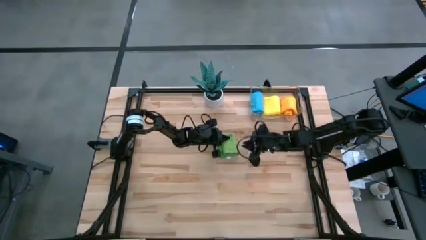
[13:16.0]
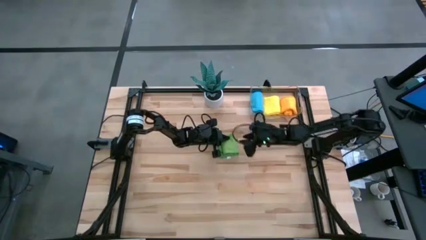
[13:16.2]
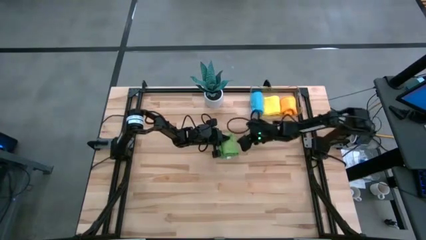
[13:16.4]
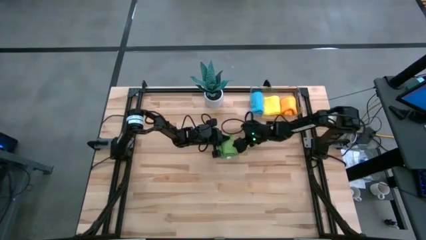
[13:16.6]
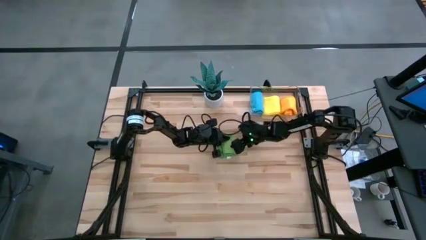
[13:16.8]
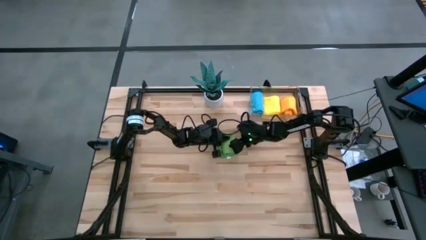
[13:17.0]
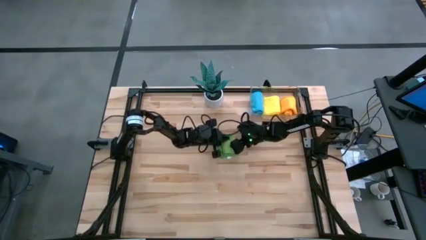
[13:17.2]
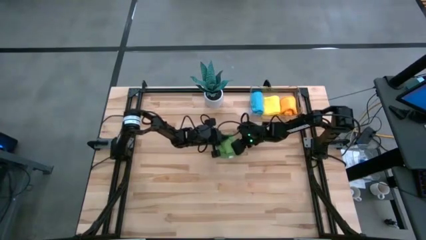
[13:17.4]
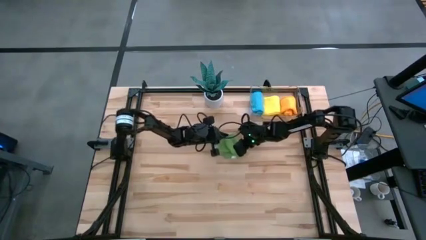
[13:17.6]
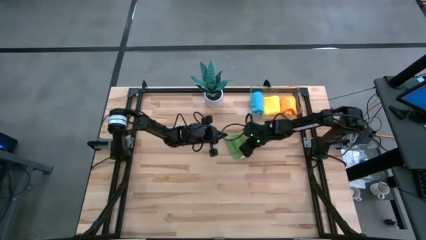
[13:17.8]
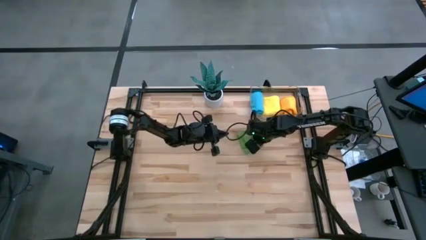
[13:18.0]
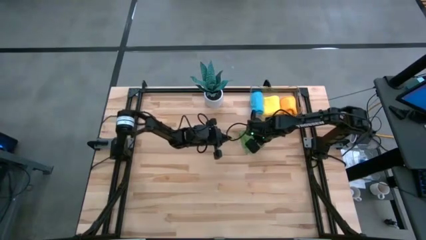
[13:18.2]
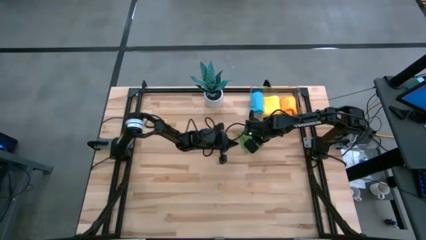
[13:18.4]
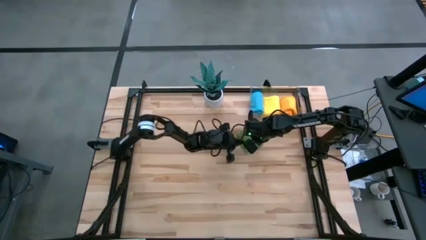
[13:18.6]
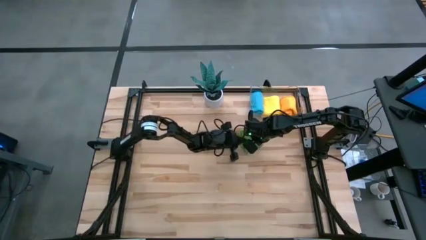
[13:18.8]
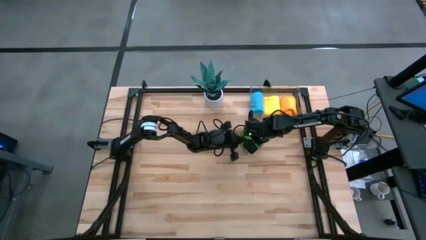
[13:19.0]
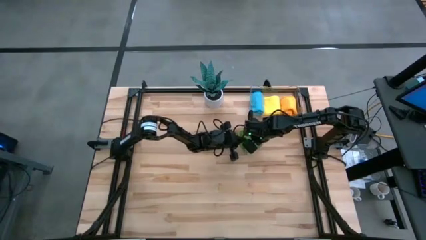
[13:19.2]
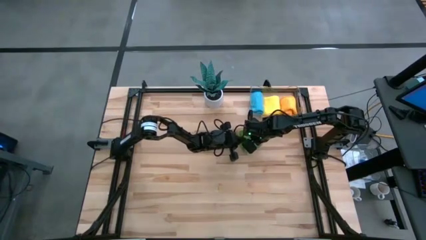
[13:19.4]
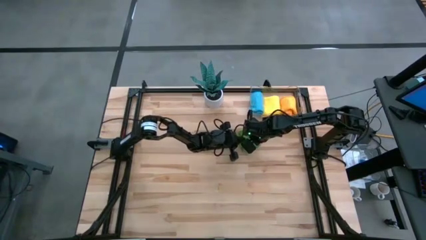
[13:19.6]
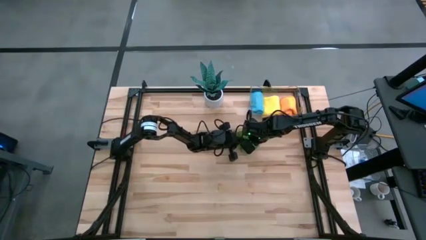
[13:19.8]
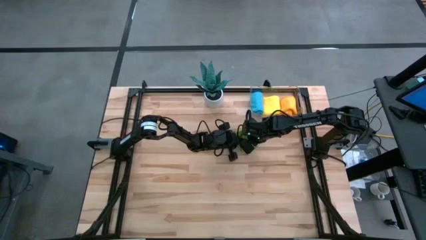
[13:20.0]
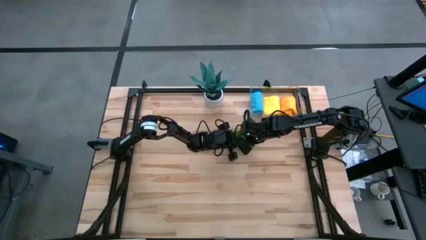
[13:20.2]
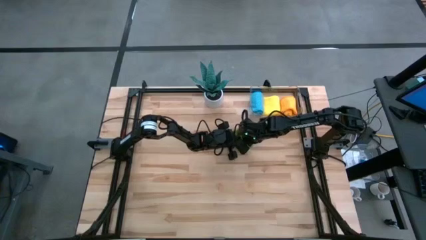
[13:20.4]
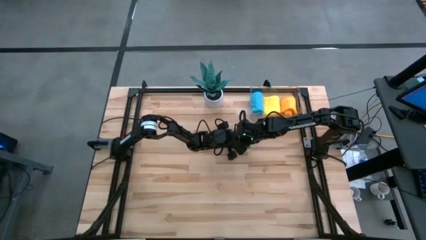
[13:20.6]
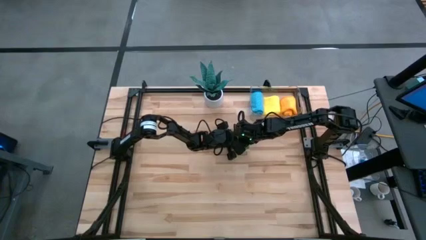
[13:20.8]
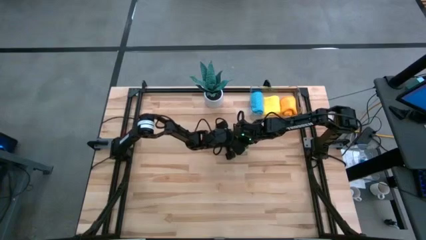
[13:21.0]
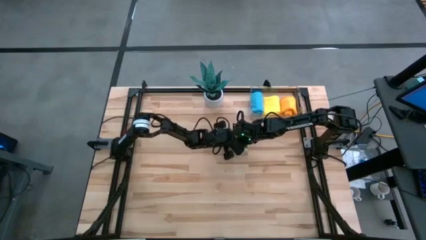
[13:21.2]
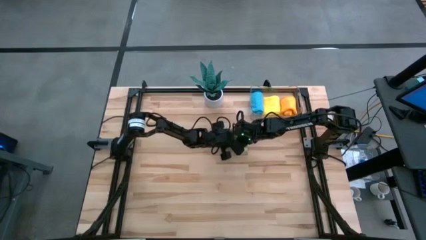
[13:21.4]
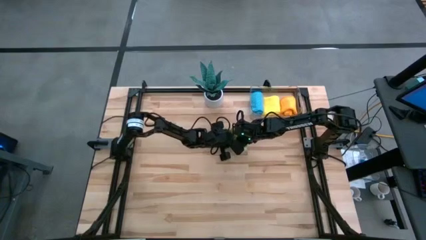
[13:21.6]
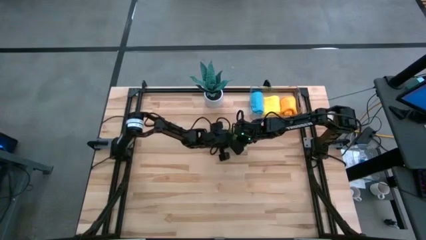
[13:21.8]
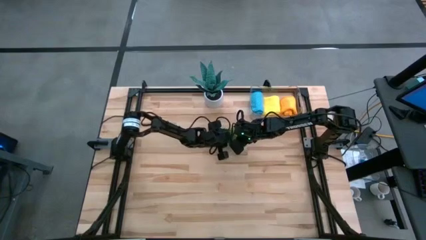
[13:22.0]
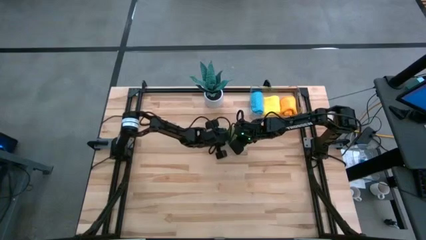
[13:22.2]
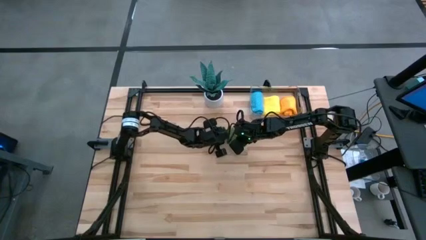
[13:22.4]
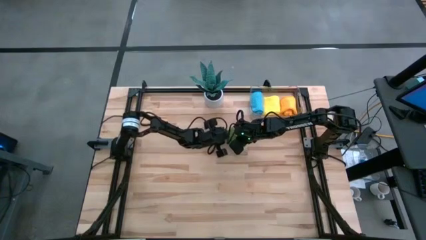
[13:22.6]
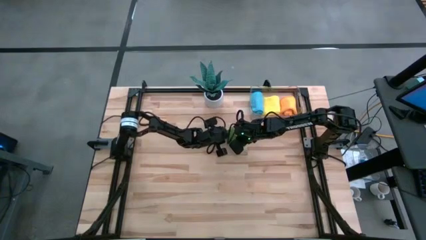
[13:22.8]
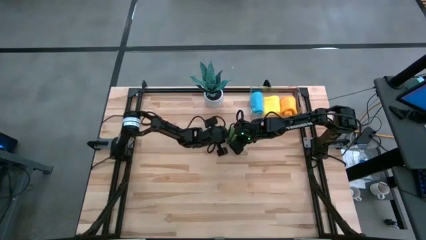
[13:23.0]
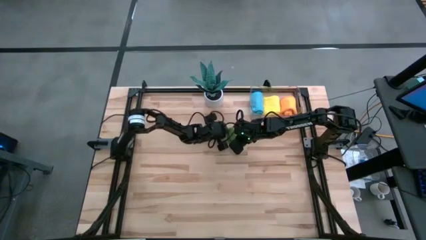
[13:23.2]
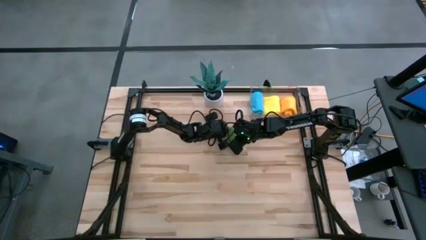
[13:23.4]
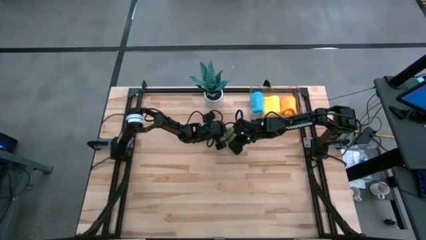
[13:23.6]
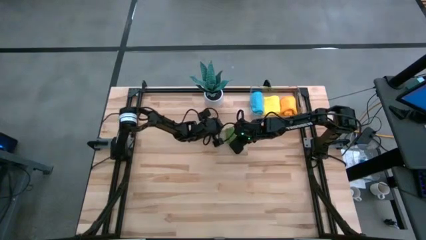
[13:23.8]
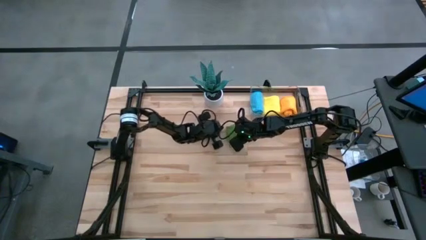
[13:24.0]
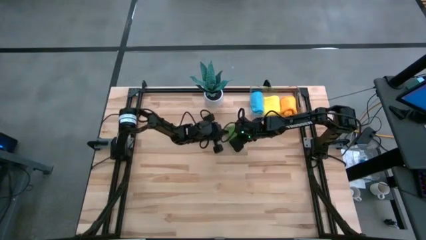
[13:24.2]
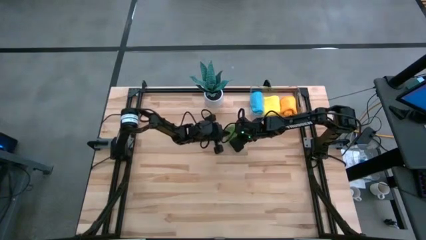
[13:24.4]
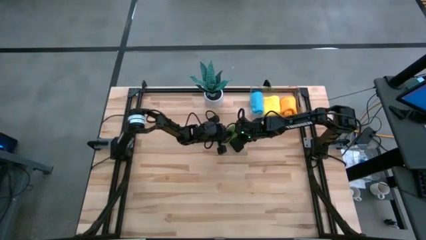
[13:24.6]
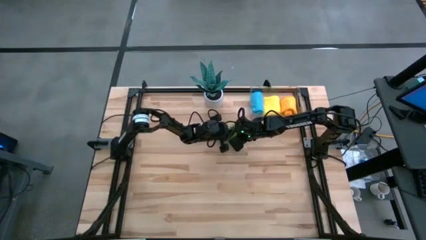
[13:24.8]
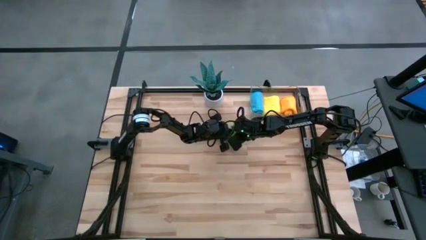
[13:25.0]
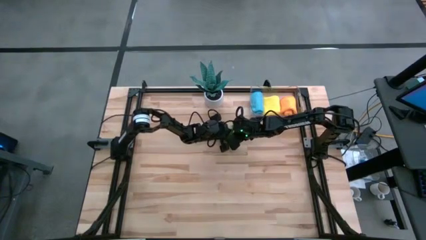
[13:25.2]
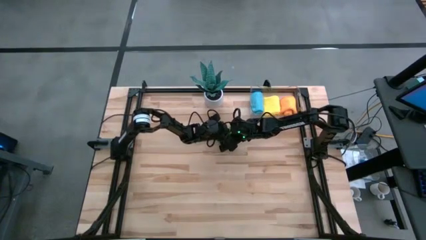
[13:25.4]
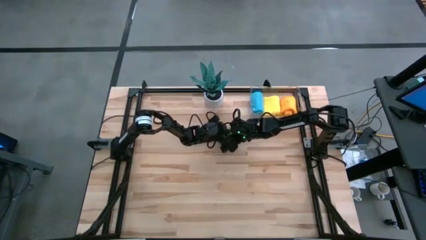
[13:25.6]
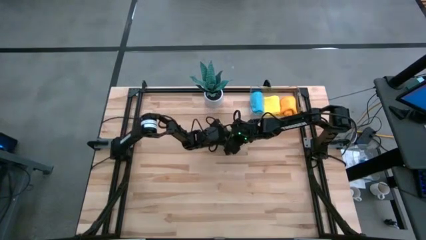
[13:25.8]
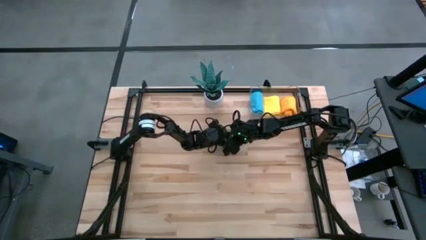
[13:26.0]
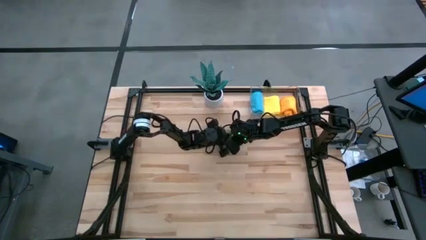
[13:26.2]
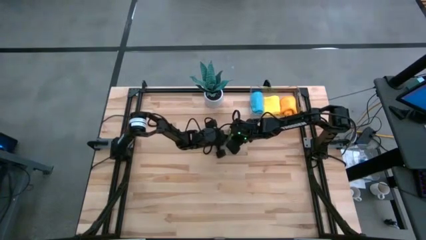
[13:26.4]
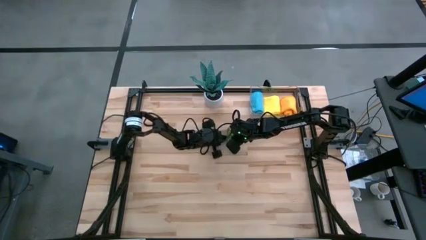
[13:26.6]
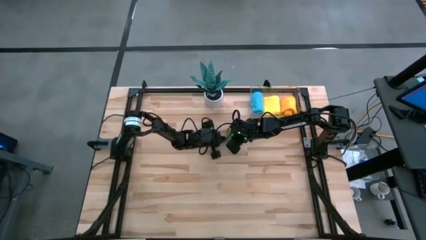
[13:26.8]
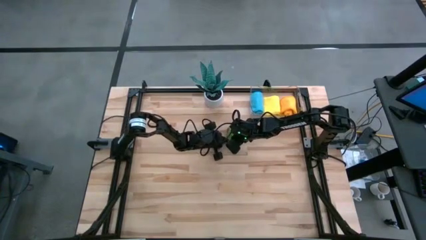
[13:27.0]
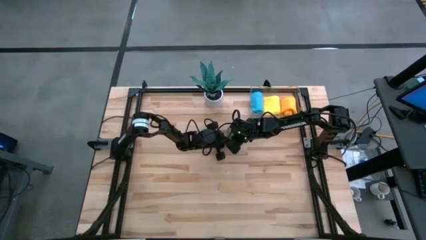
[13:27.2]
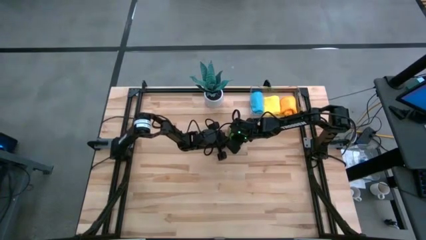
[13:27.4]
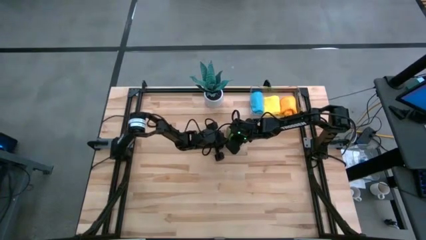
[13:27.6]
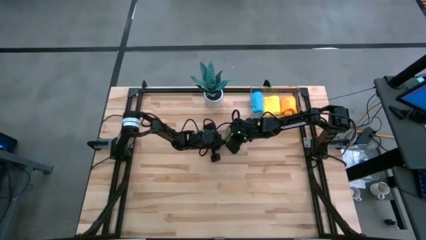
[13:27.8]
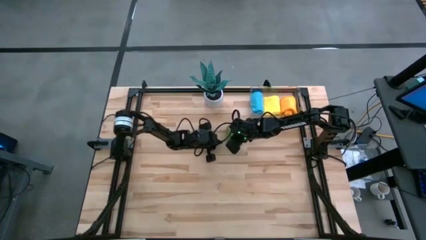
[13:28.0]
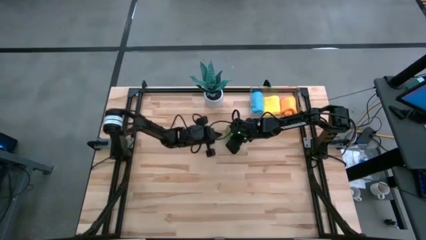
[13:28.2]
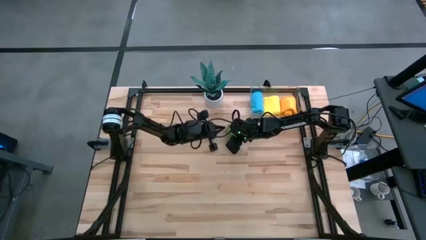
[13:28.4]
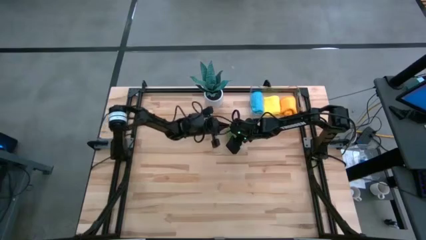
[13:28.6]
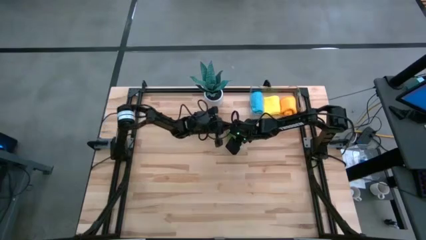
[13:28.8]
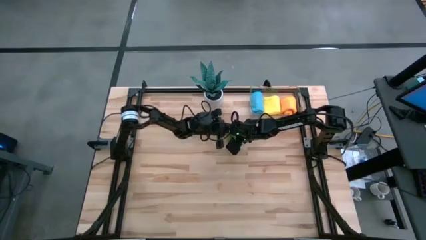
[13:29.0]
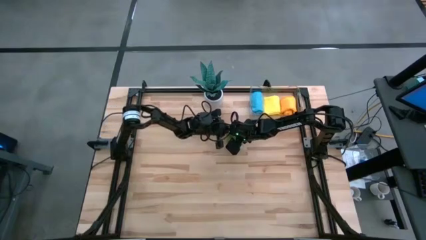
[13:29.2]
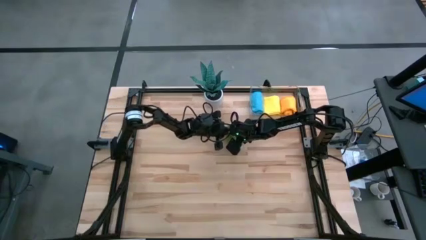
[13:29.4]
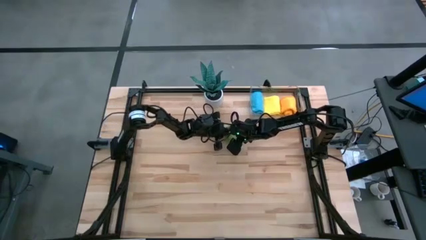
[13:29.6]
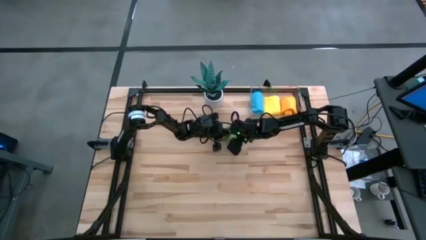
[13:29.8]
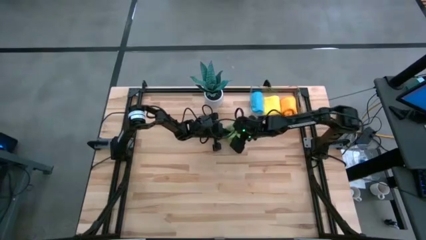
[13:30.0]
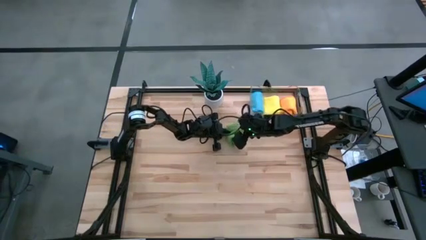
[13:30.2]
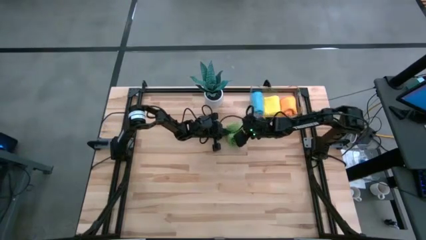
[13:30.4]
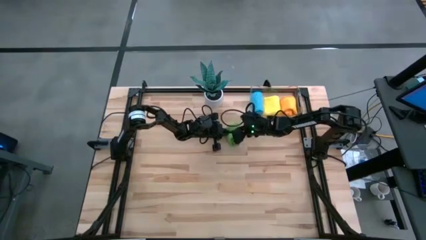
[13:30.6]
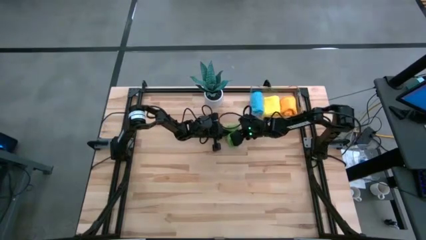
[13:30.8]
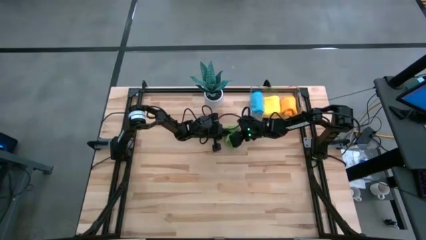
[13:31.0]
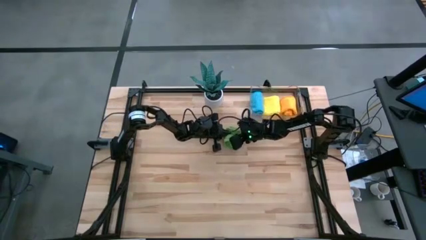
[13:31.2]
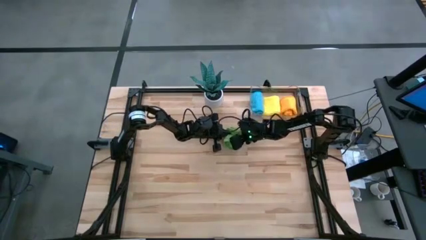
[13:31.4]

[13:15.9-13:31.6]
Task: Roll microfiber towels into tight, uniform cylinder then place into a basket
Roll the green microfiber cloth
